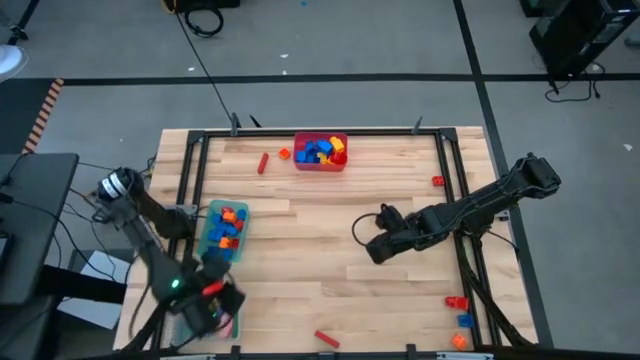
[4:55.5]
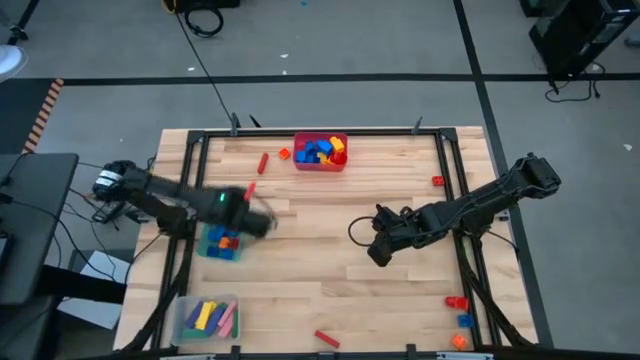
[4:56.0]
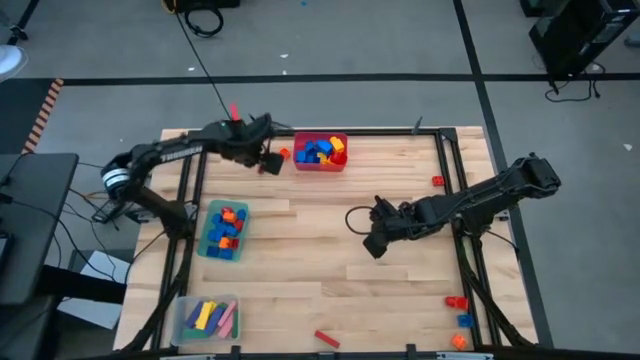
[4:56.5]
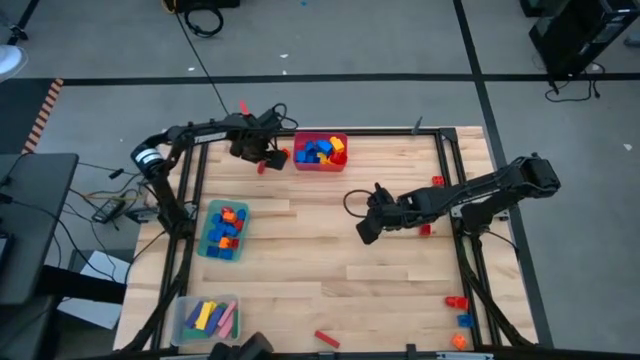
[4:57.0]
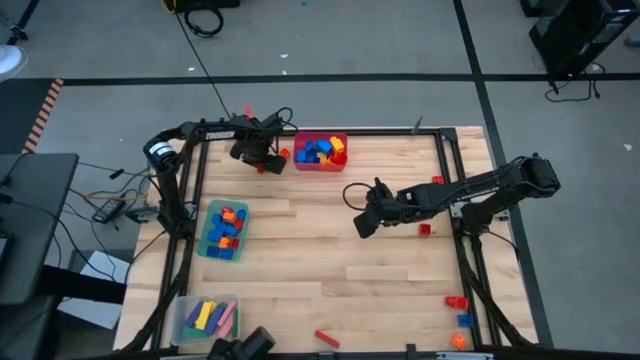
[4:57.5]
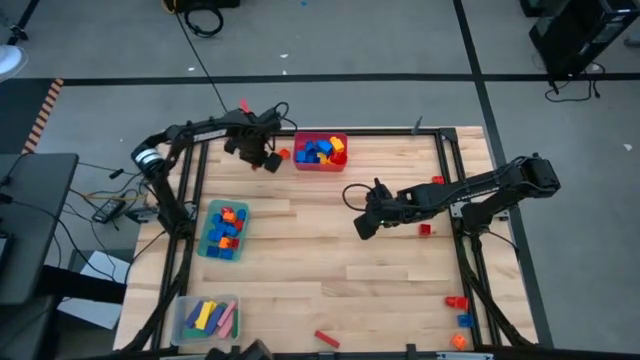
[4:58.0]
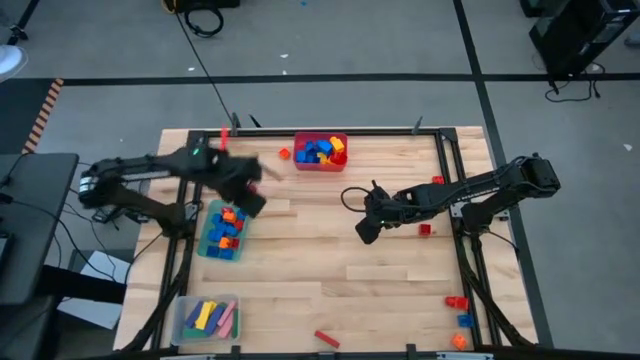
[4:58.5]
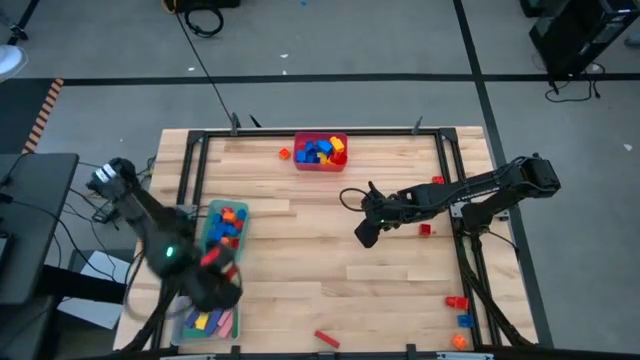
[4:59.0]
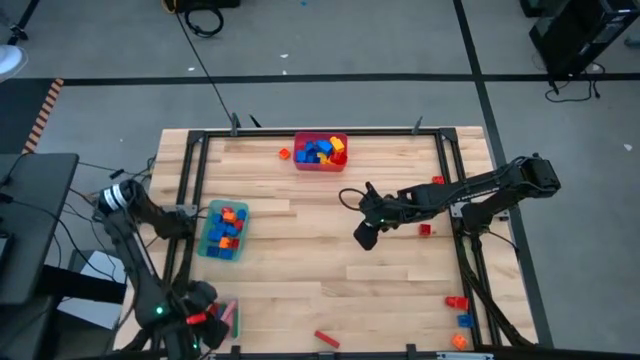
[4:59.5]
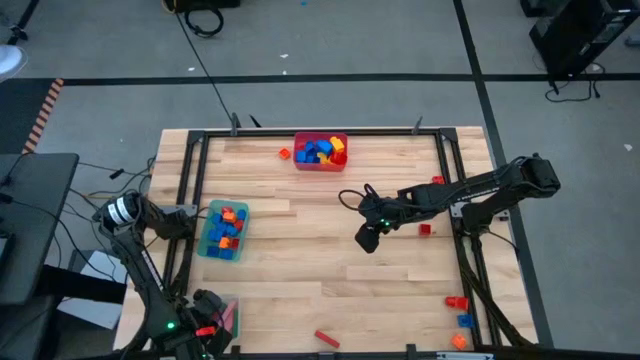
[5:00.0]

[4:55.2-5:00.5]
Task: Sort blocks by size
Put the red rectangle block into the transparent bin

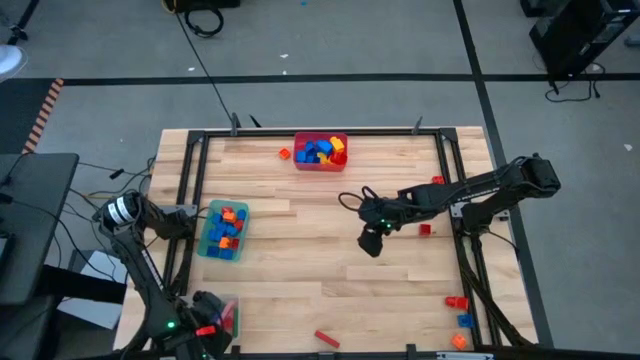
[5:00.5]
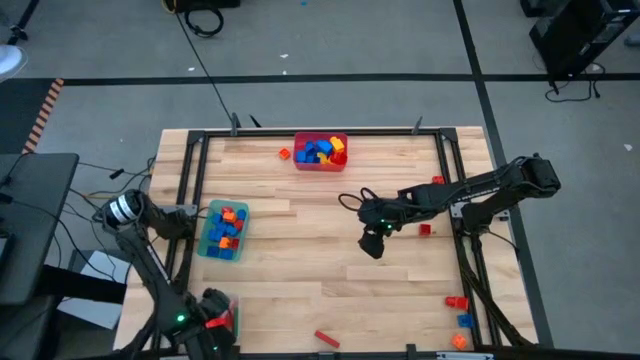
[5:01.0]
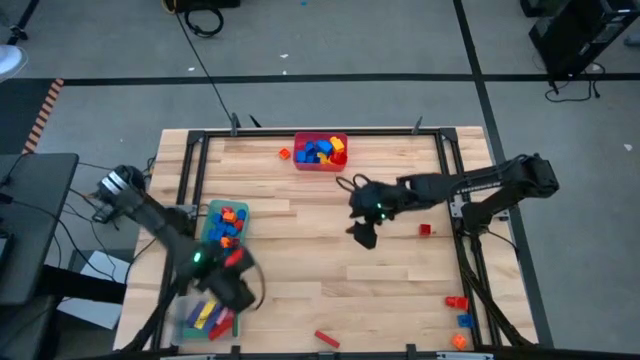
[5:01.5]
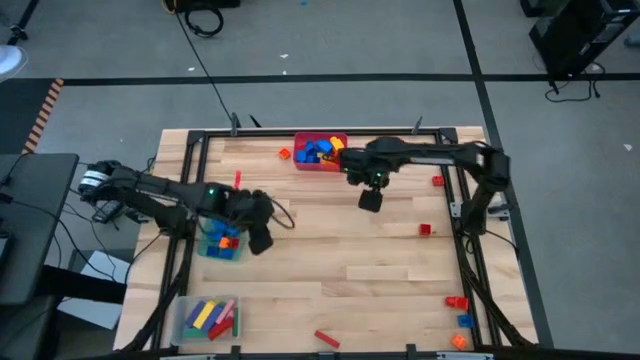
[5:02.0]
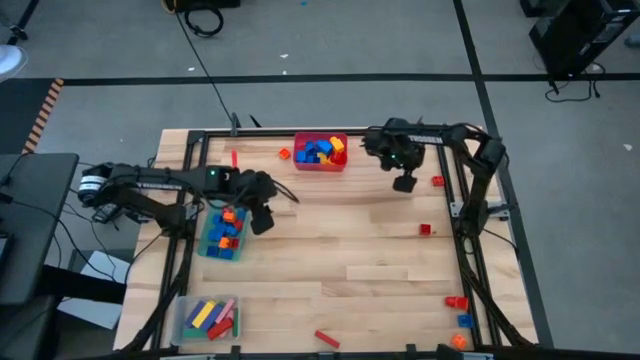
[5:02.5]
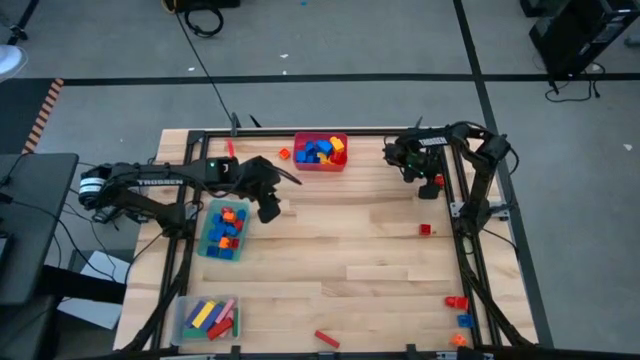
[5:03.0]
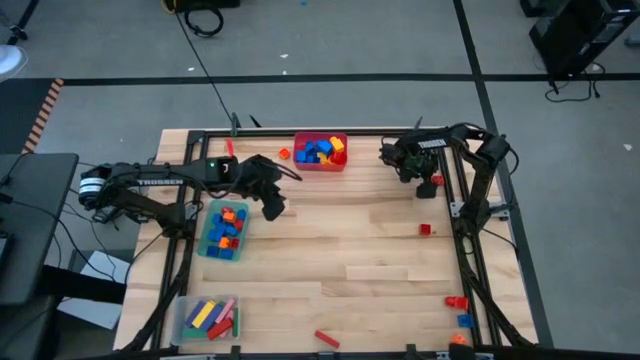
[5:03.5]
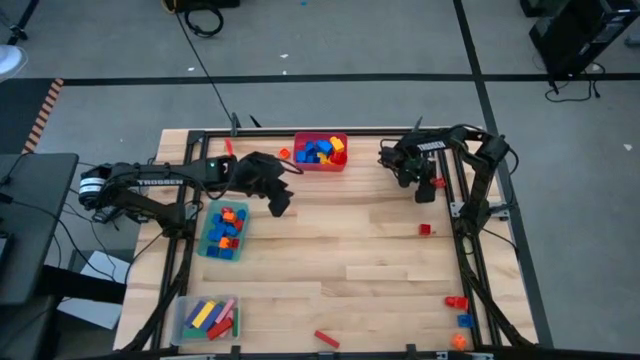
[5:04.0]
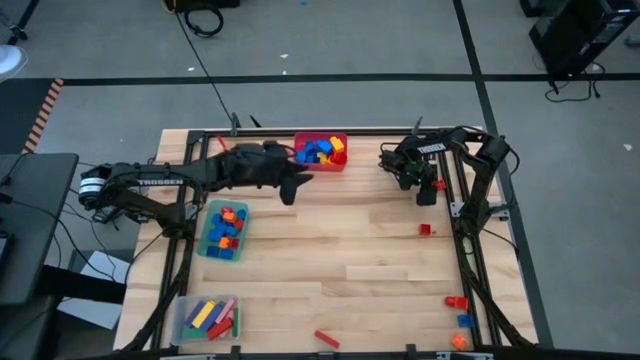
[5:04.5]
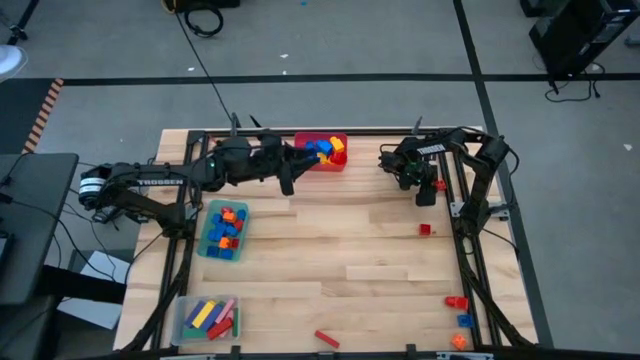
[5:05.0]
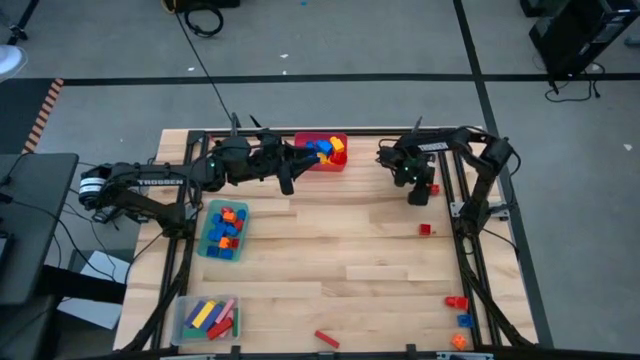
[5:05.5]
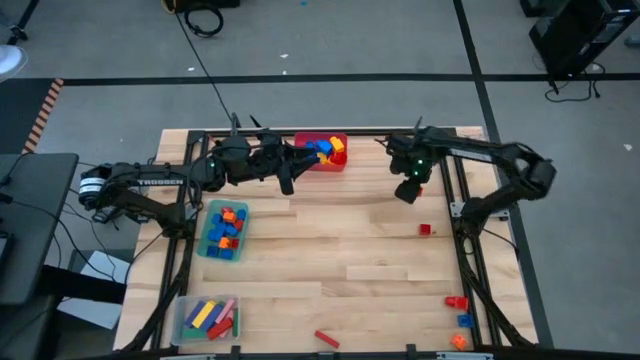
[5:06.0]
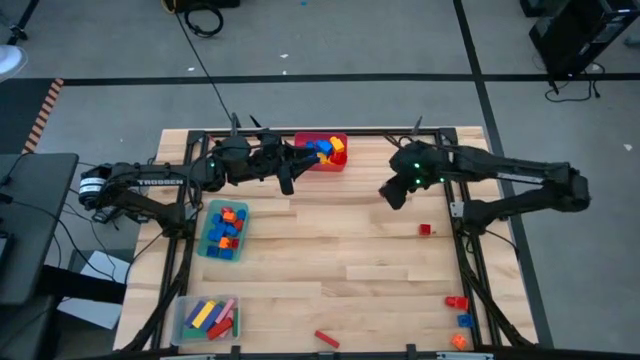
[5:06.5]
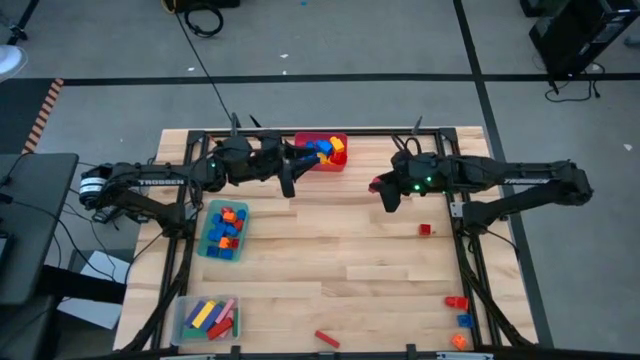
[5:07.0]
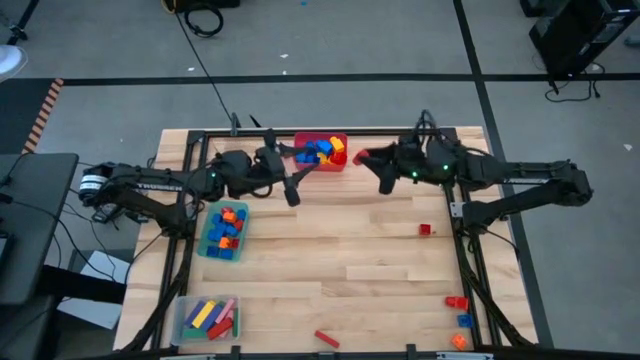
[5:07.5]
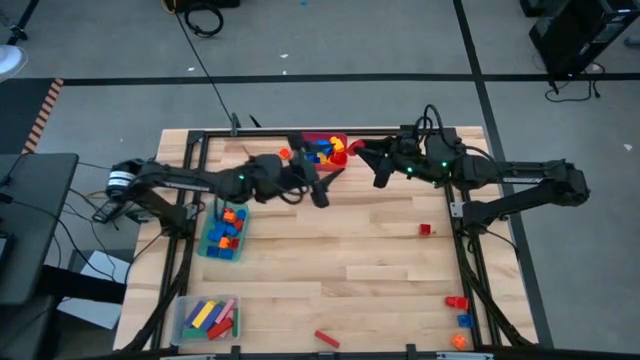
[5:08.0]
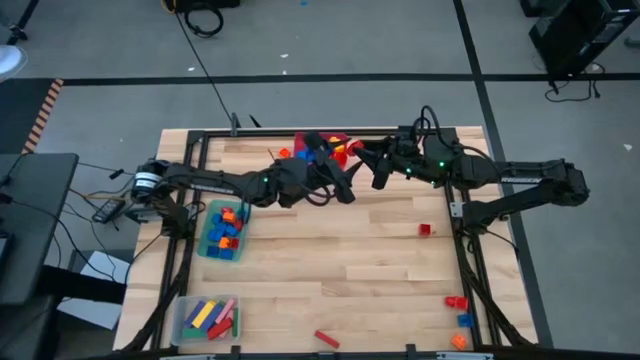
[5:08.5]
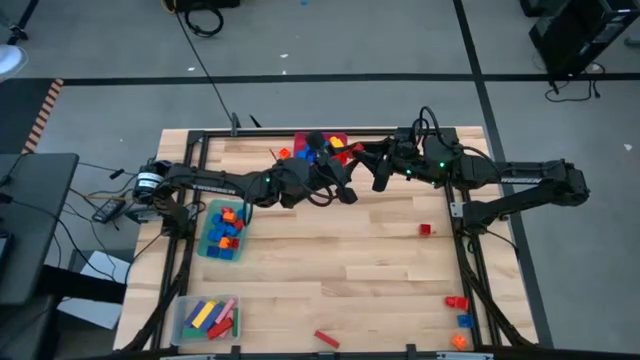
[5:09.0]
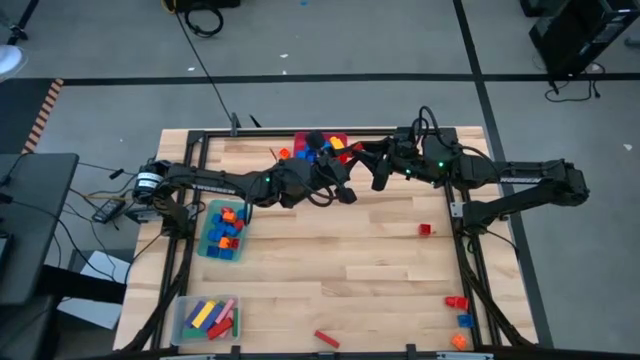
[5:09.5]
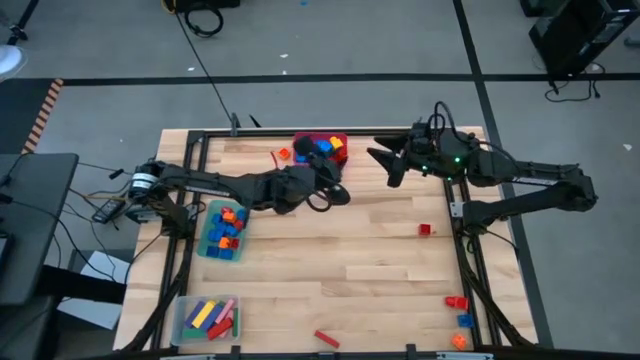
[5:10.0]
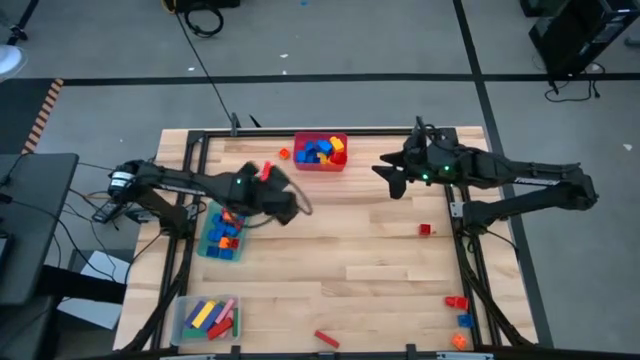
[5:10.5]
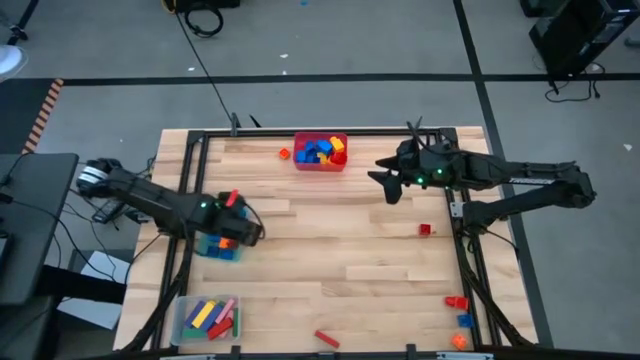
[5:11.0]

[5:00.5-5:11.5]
Put the red 4 studded building block into the teal bin

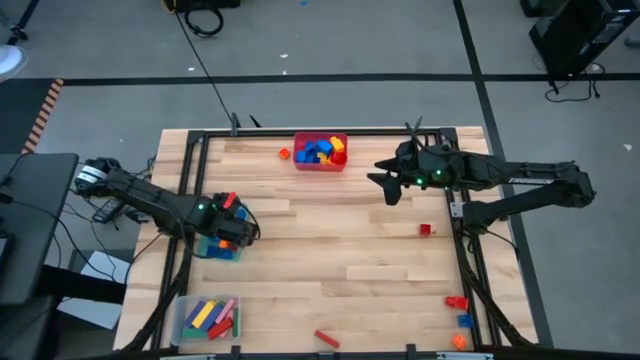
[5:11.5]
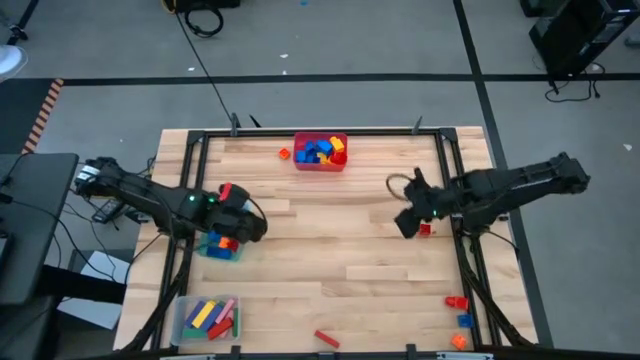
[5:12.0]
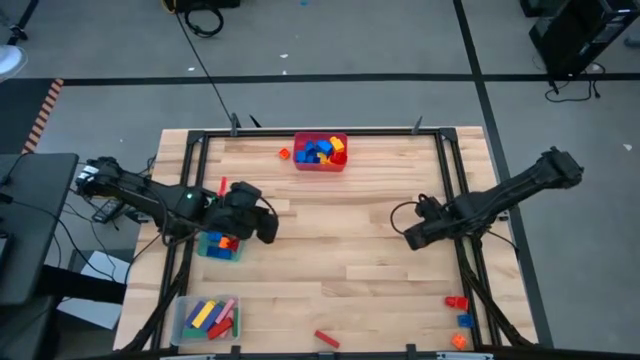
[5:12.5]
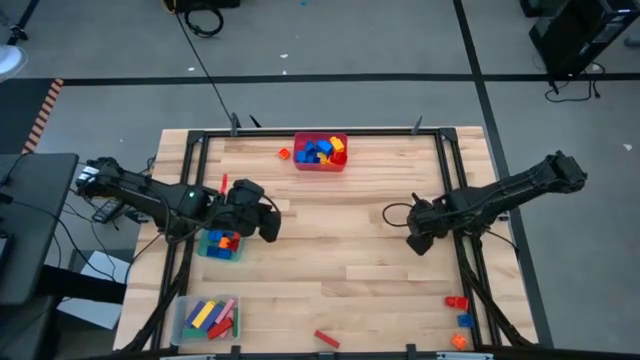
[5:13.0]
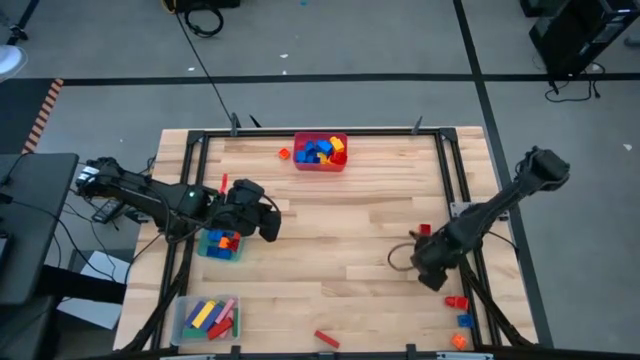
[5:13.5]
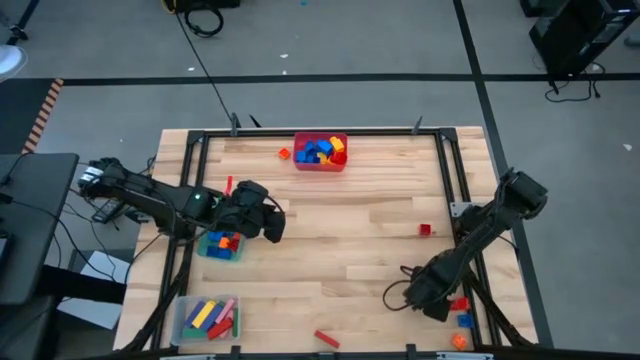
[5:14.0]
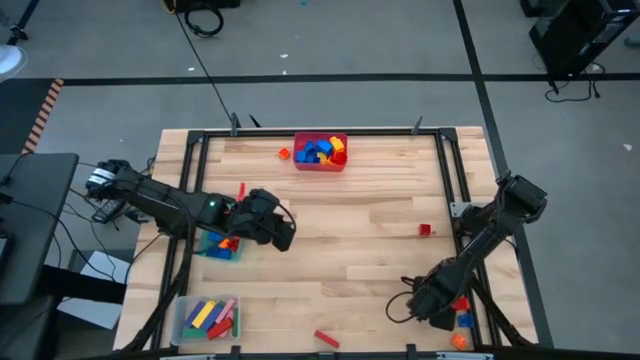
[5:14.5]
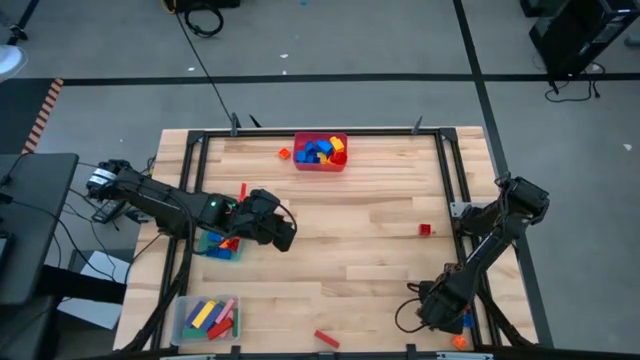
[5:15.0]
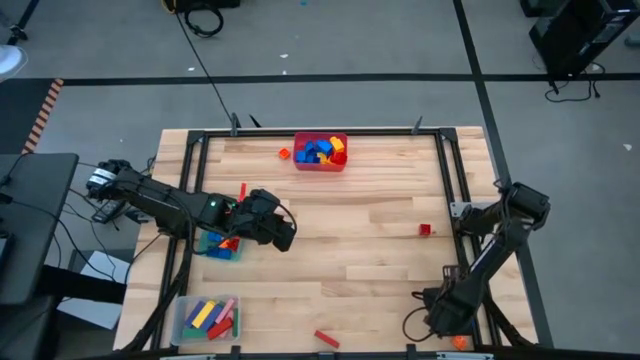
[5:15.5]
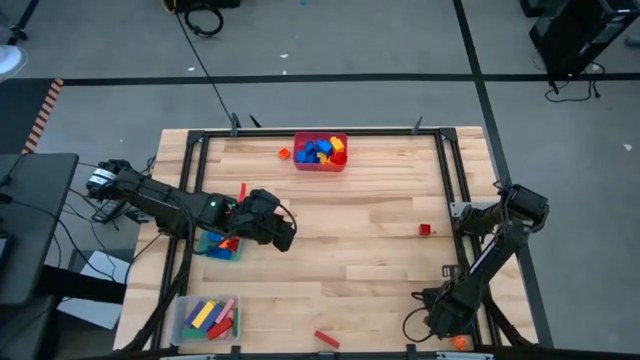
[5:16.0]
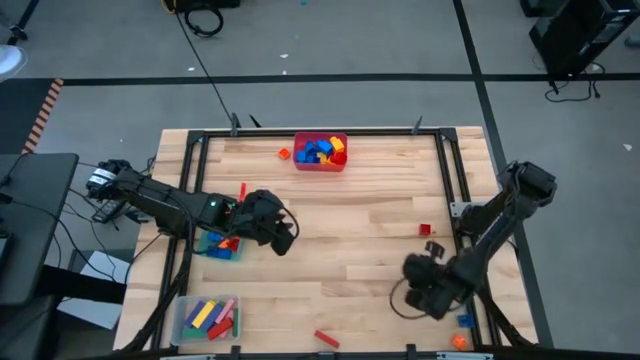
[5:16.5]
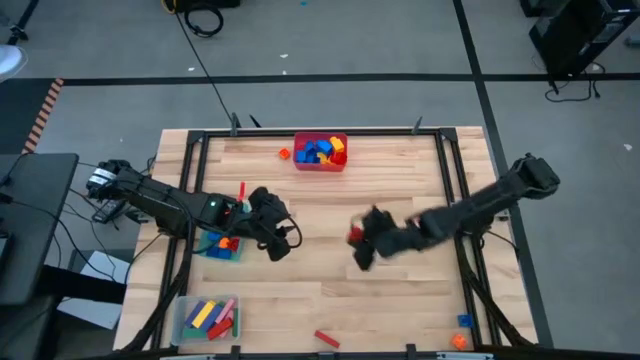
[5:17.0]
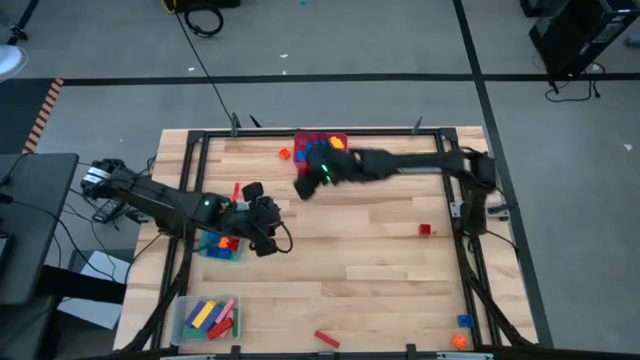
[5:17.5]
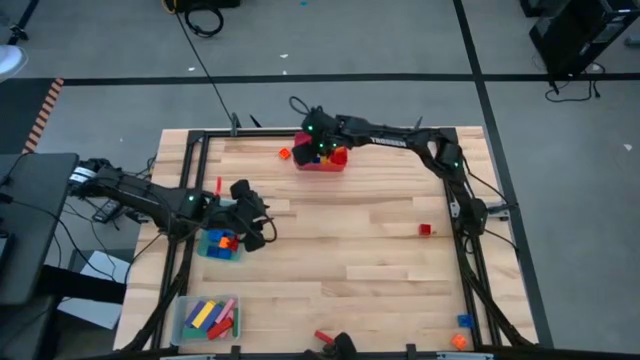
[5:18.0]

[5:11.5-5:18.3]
Put the red 1 studded building block into the red bin
